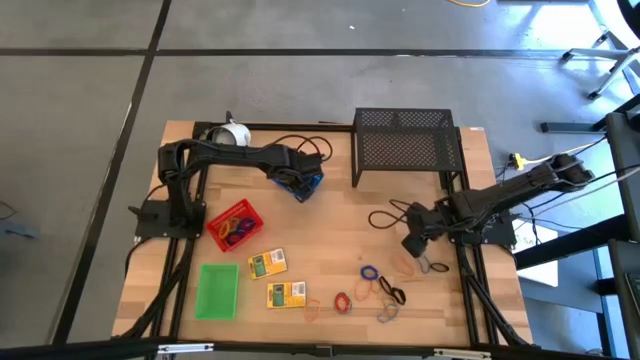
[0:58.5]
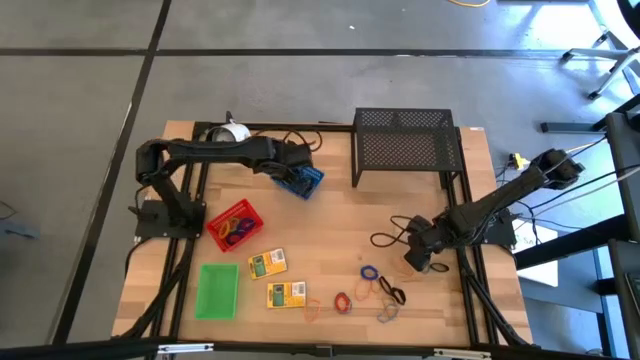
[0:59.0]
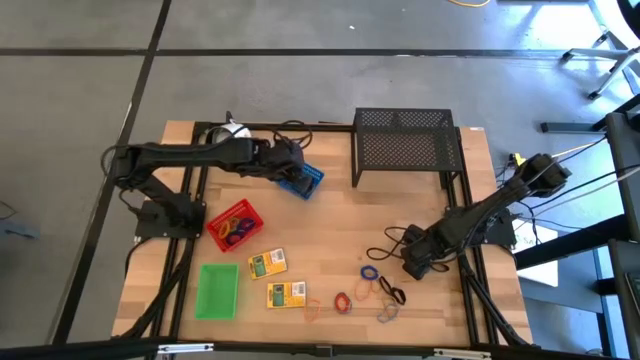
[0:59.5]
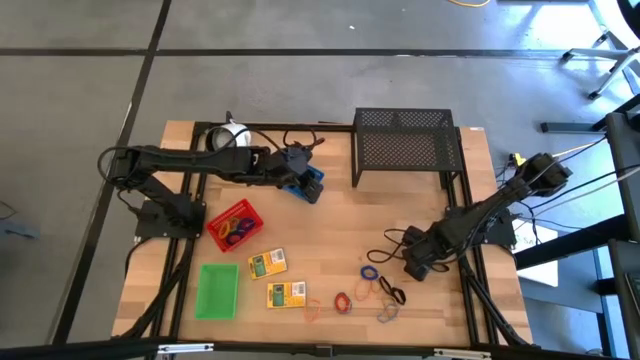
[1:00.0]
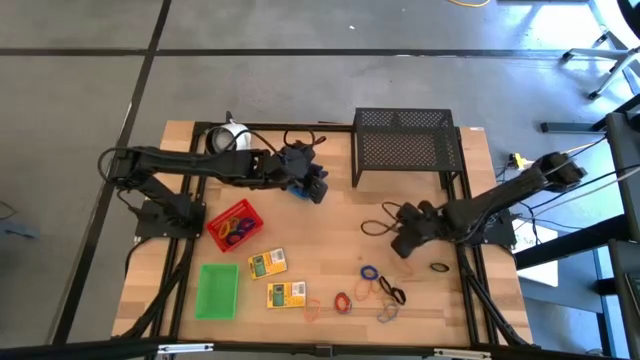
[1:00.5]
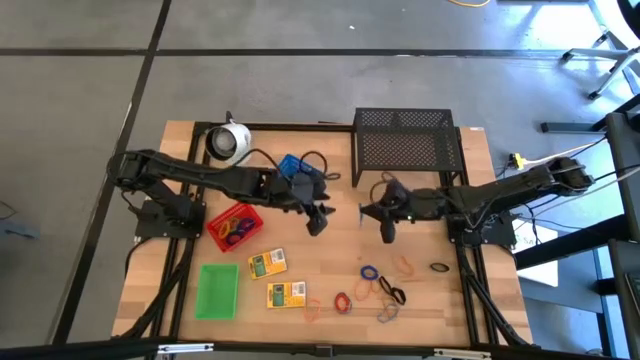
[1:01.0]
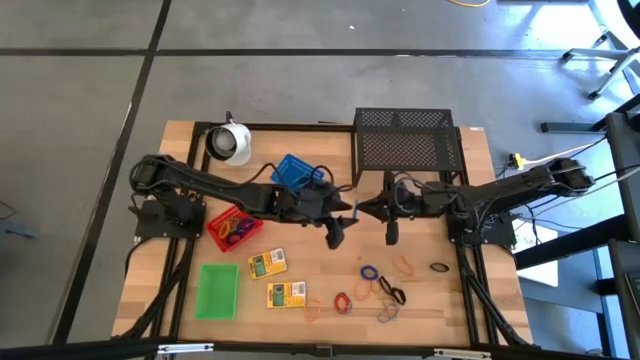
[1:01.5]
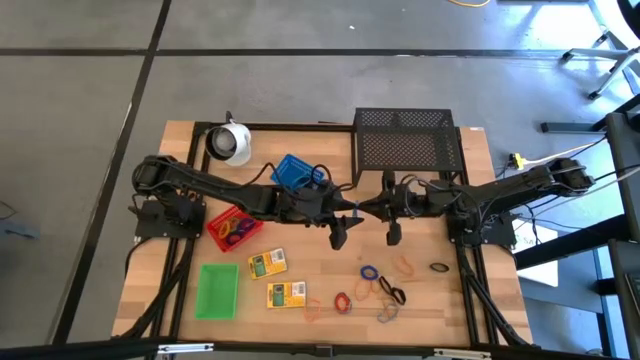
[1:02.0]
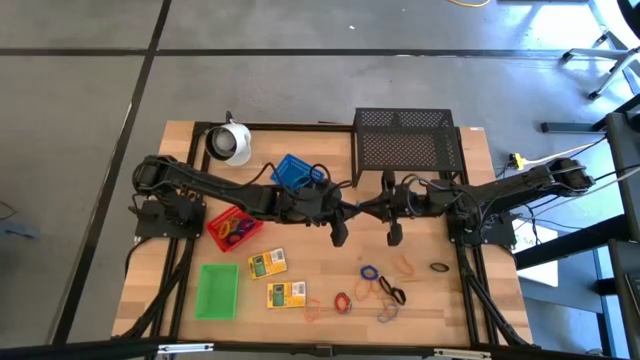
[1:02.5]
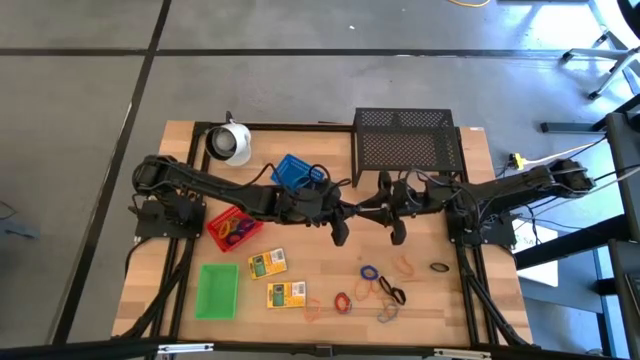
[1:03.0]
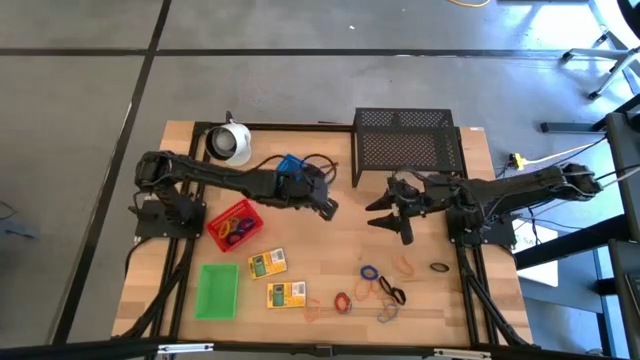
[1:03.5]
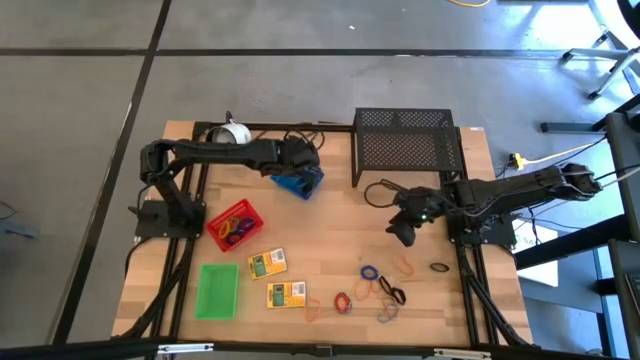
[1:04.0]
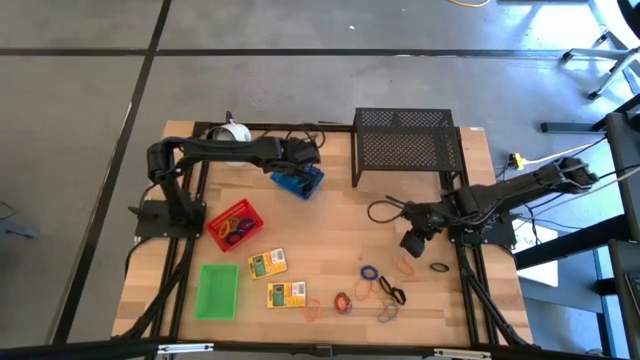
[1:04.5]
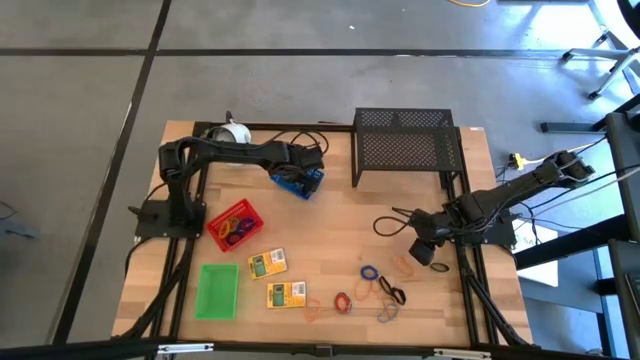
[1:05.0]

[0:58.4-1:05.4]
Task: Pick & Place Office Desk Supplies
Put the blue rubber band into the blue bin

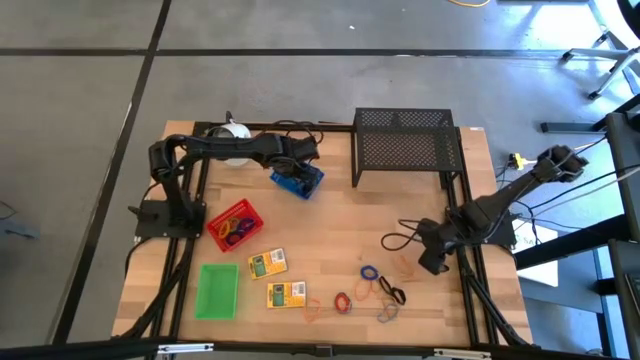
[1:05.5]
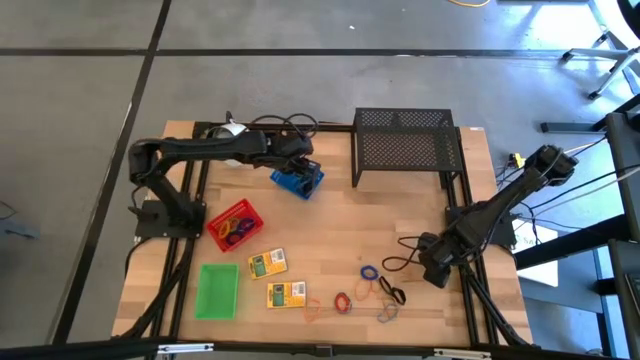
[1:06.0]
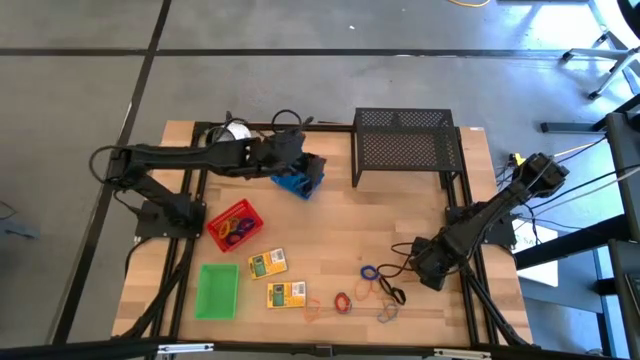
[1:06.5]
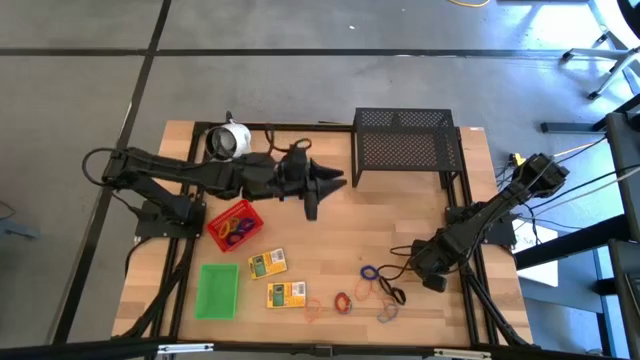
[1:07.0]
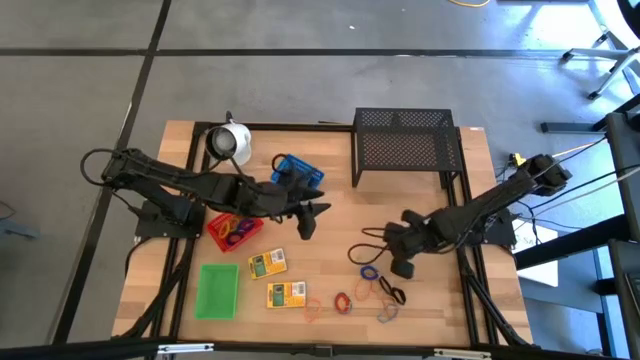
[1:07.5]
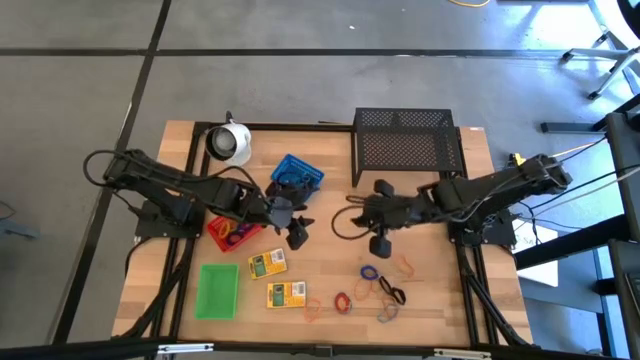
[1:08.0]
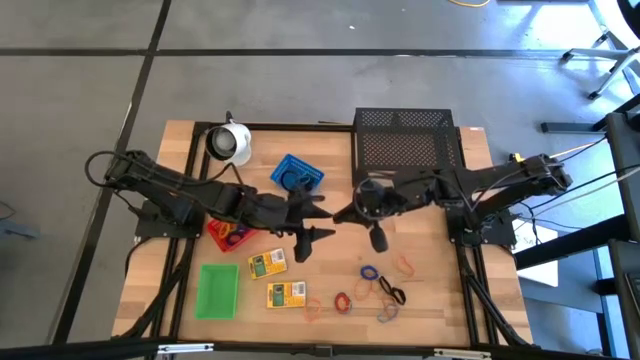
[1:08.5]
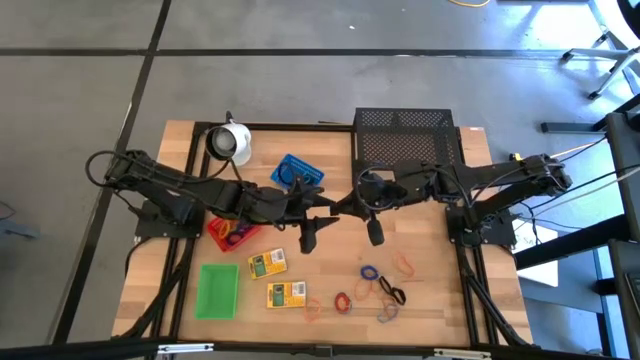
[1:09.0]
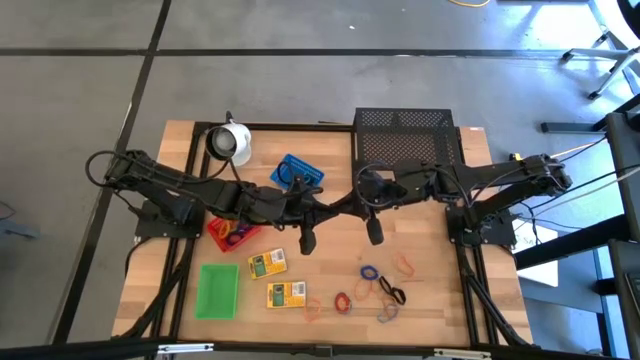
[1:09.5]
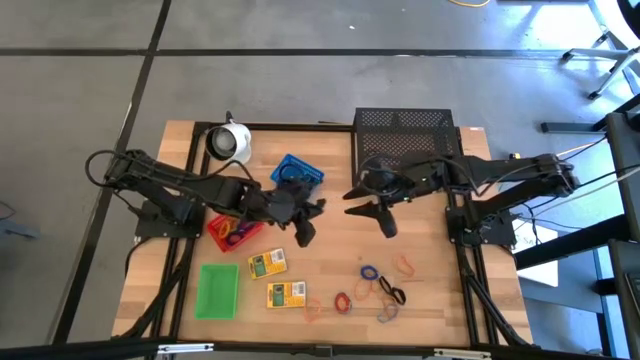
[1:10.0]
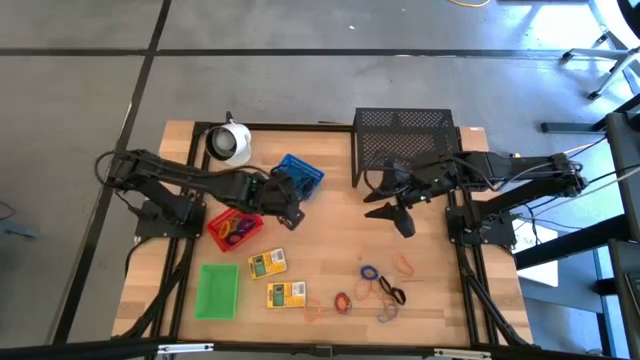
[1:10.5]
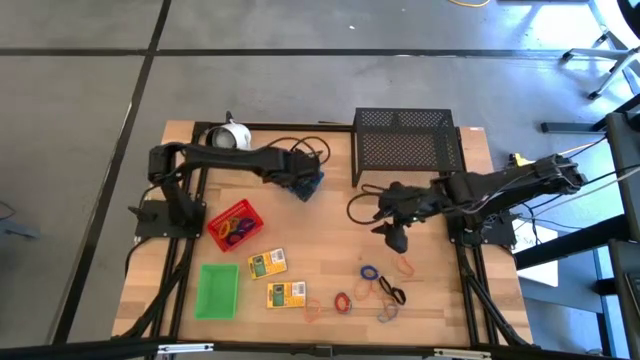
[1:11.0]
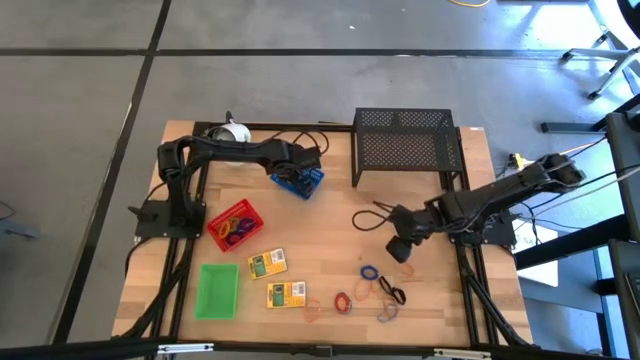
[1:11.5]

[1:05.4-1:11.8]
Put the black rubber band into the blue bin

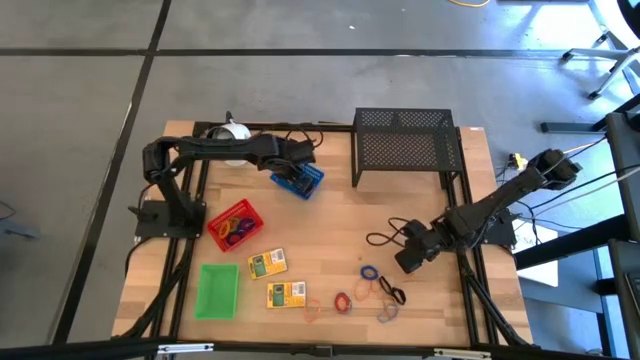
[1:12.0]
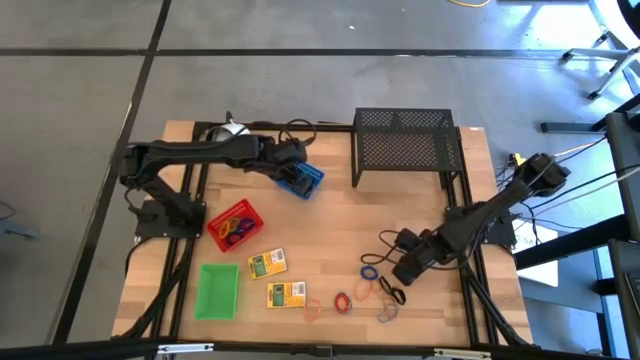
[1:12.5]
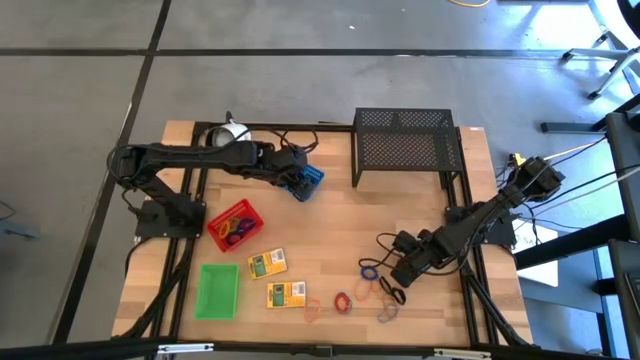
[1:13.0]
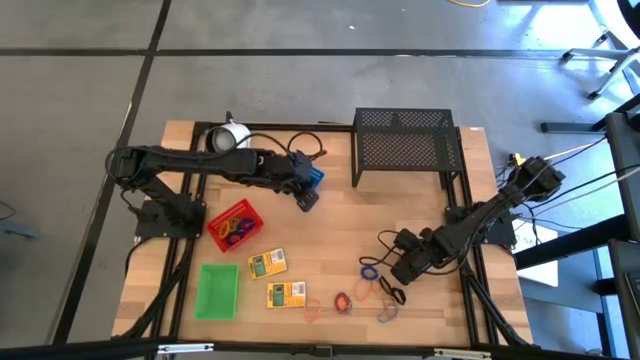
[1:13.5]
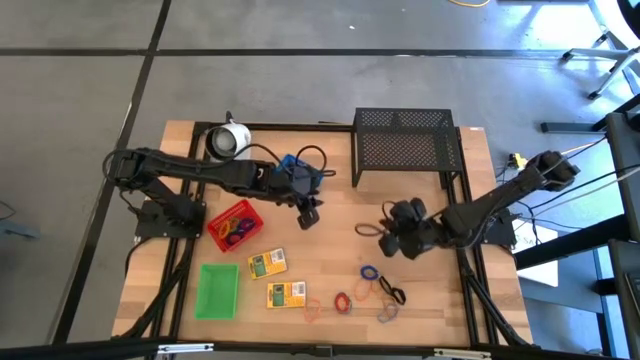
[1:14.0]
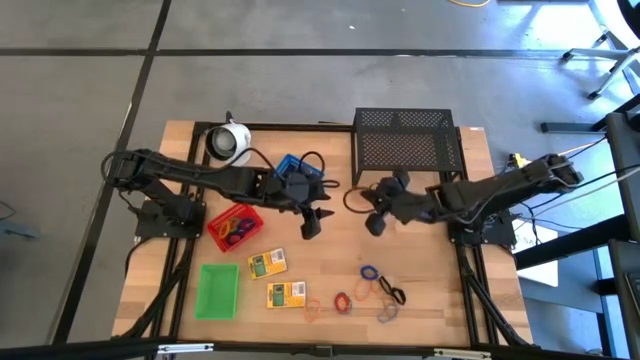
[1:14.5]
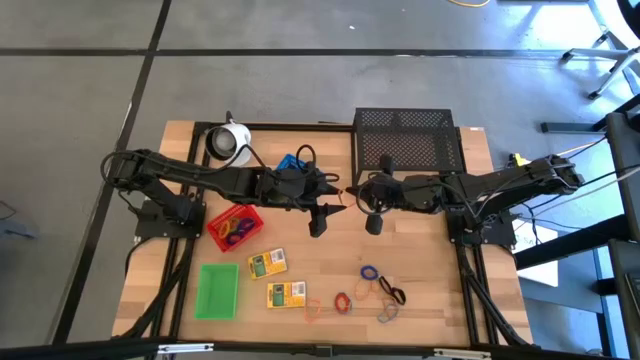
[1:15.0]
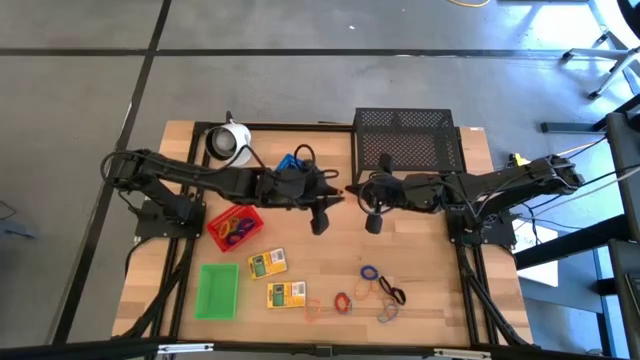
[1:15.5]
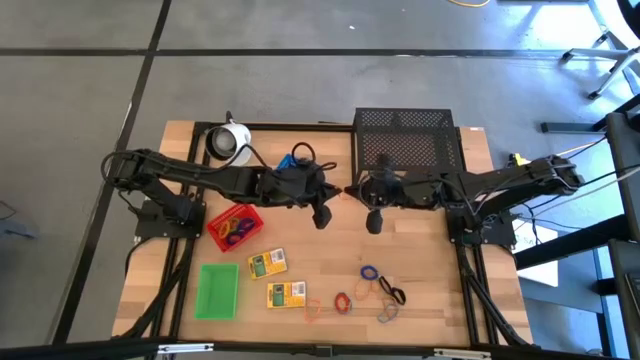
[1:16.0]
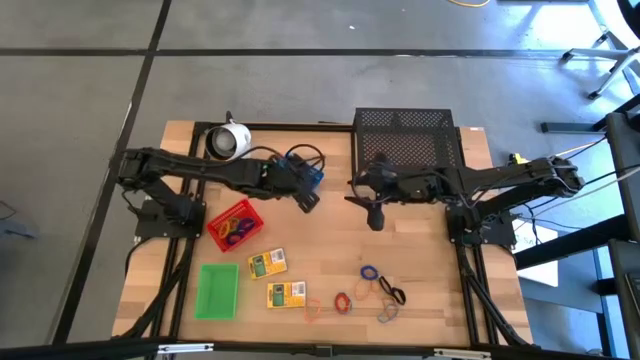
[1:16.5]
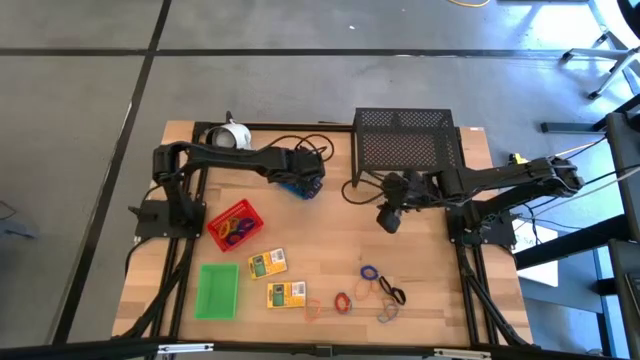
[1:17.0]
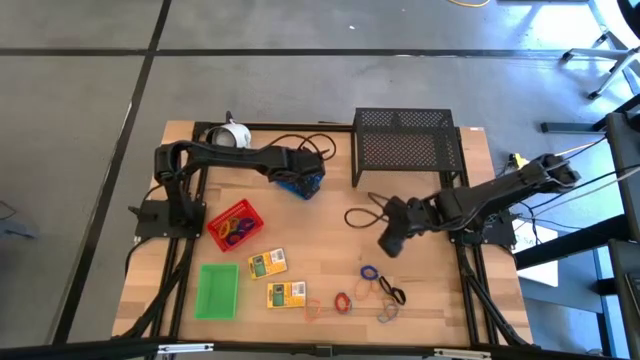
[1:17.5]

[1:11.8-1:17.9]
Put the orange rubber band into the blue bin

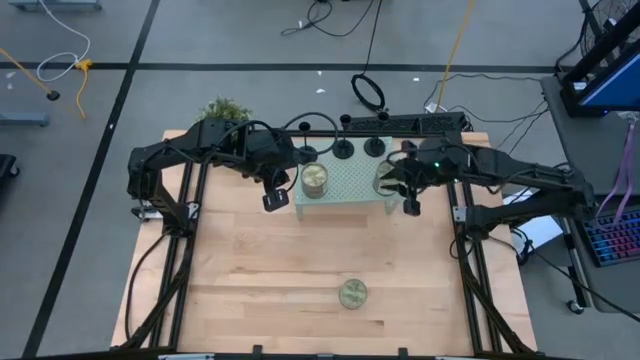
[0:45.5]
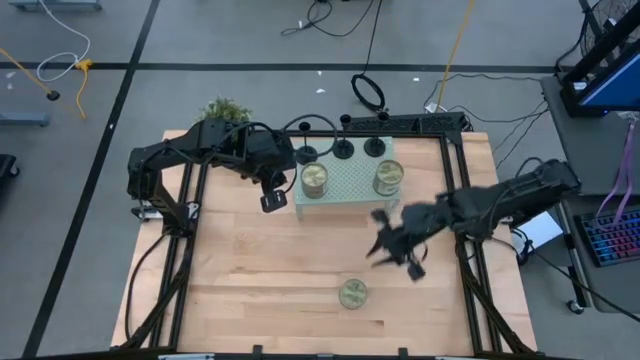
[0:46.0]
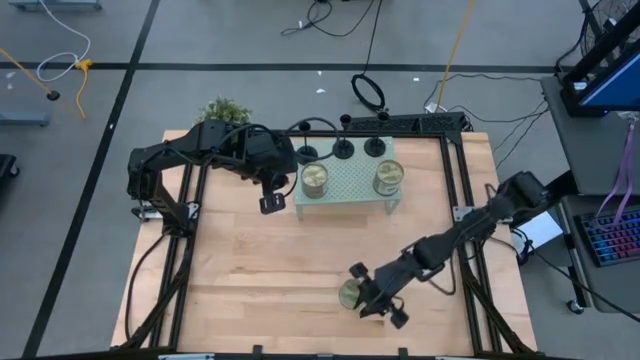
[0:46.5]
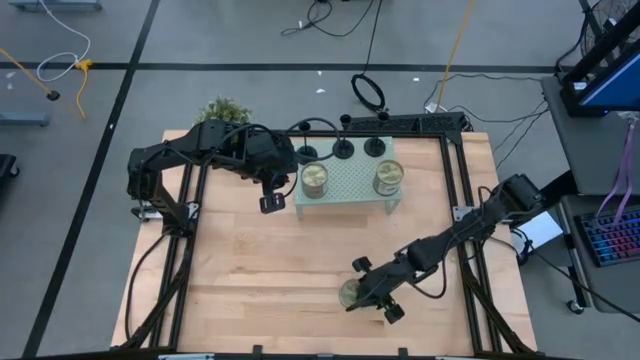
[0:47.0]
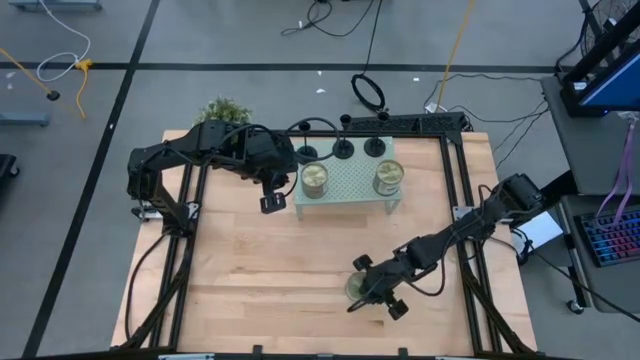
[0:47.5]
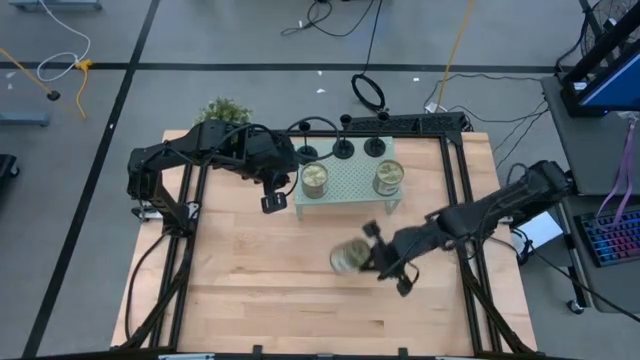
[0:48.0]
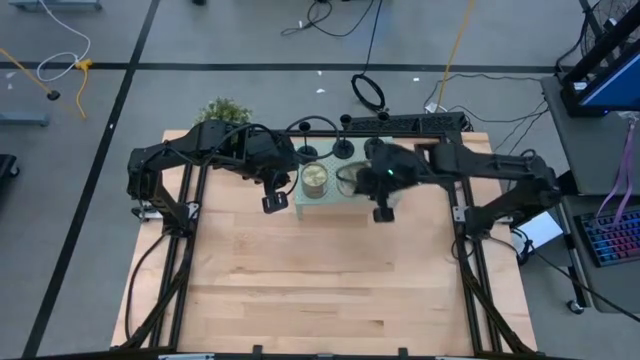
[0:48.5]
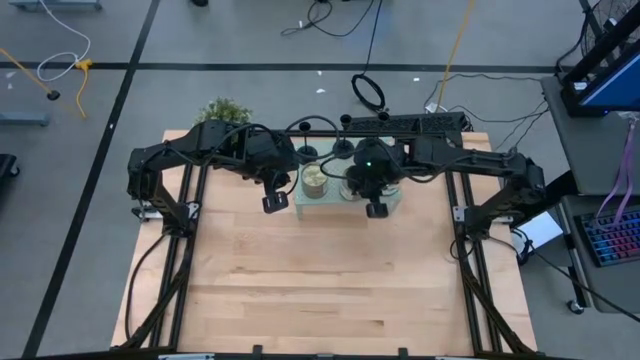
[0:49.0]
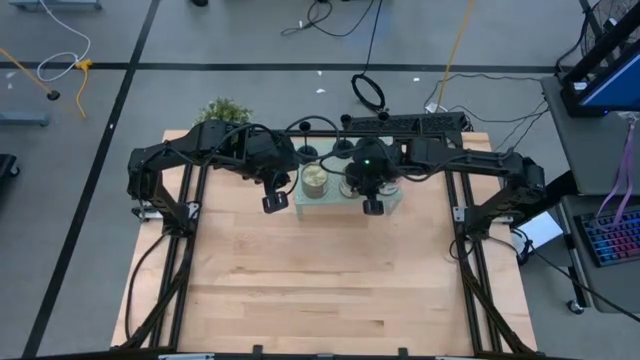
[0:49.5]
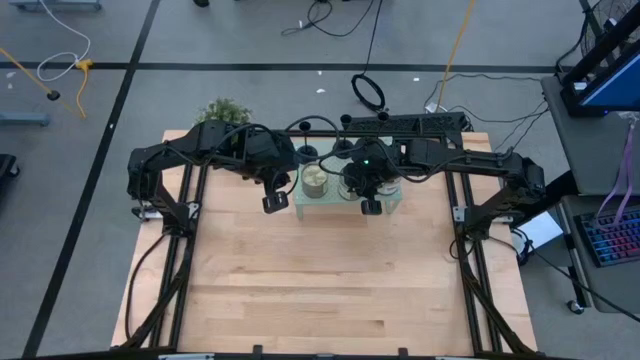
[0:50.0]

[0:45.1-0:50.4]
Task: Pick & Place candle stick holders
Align the green scented candle with the green scented candles on the shelf
